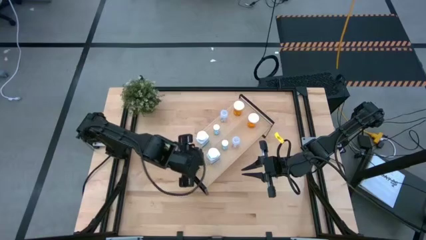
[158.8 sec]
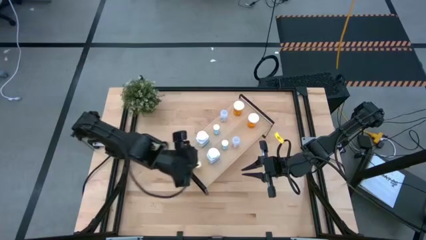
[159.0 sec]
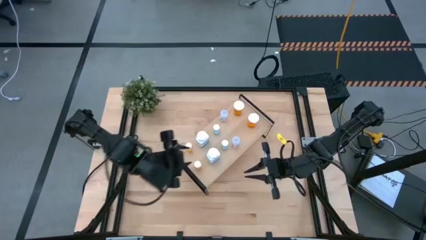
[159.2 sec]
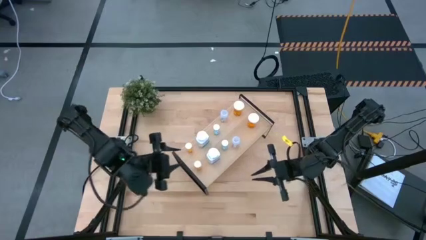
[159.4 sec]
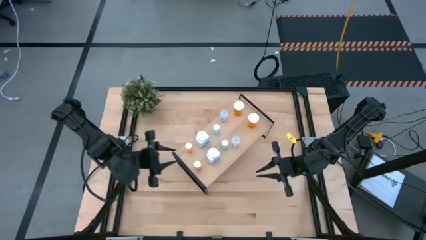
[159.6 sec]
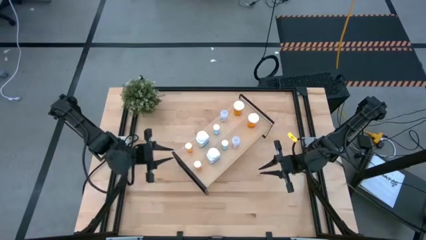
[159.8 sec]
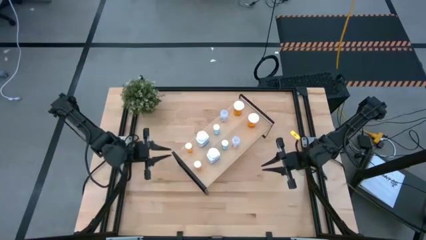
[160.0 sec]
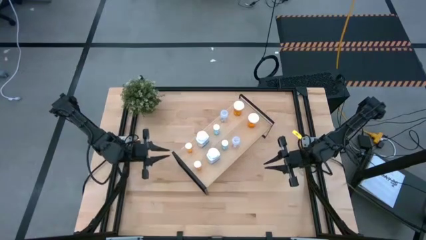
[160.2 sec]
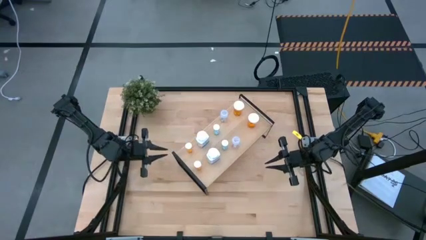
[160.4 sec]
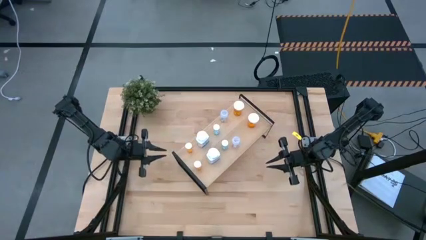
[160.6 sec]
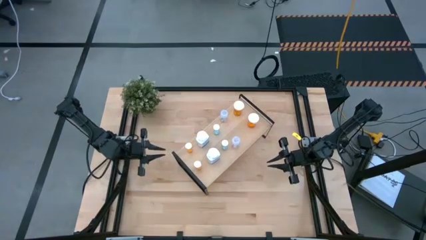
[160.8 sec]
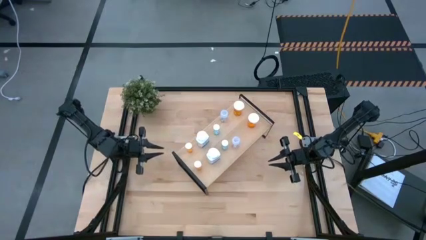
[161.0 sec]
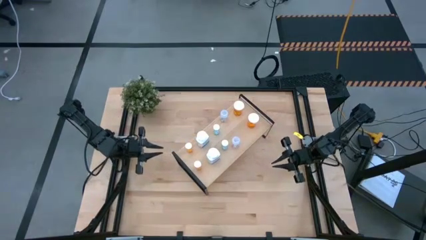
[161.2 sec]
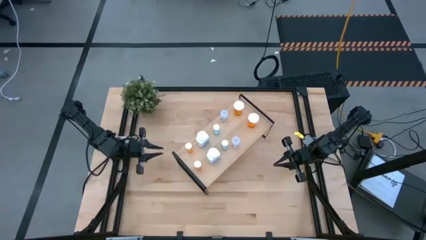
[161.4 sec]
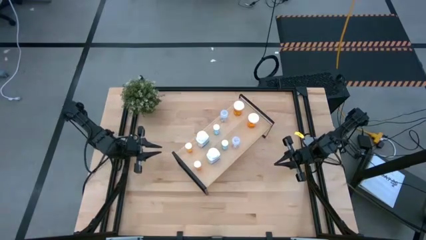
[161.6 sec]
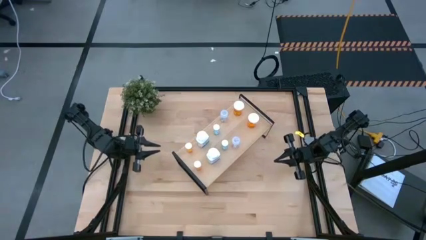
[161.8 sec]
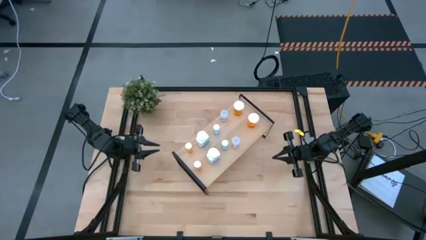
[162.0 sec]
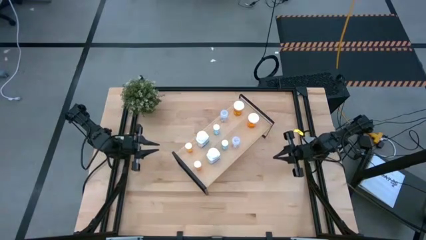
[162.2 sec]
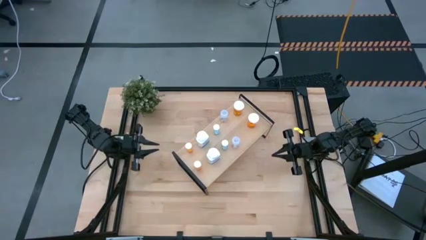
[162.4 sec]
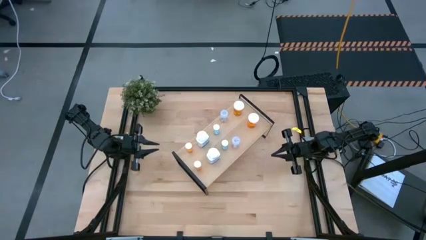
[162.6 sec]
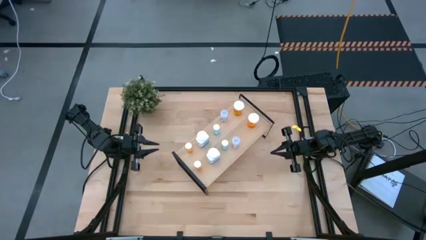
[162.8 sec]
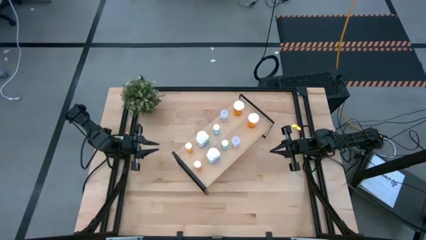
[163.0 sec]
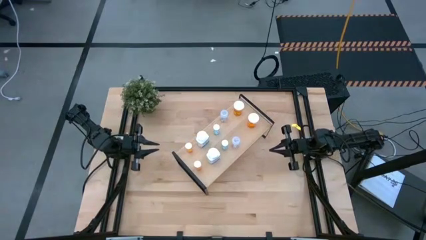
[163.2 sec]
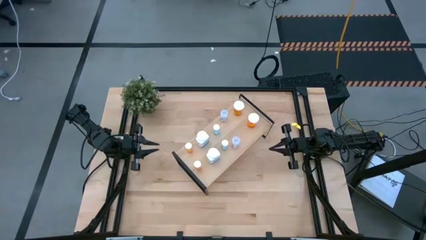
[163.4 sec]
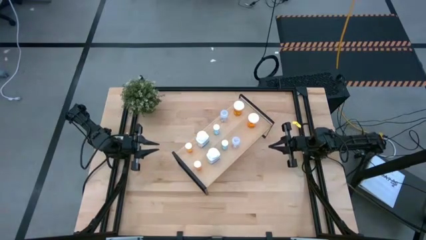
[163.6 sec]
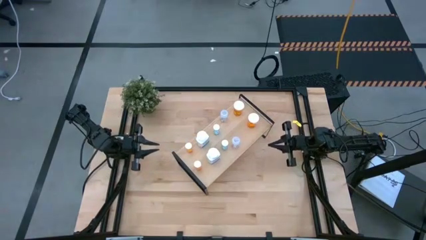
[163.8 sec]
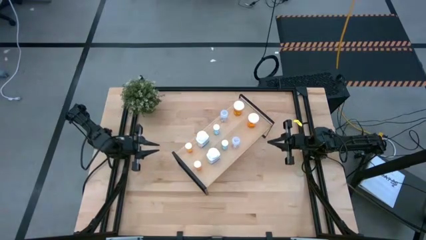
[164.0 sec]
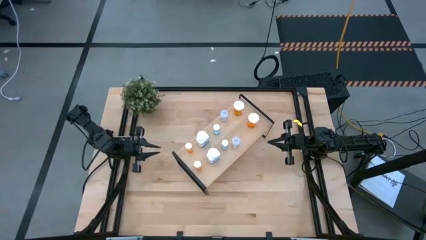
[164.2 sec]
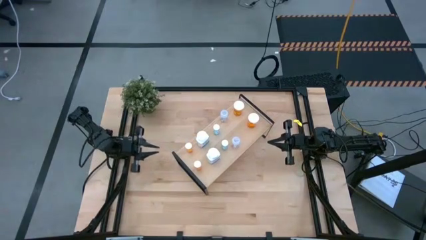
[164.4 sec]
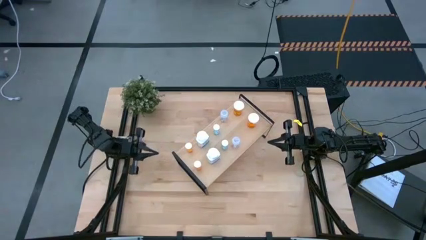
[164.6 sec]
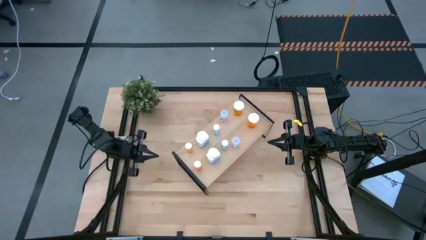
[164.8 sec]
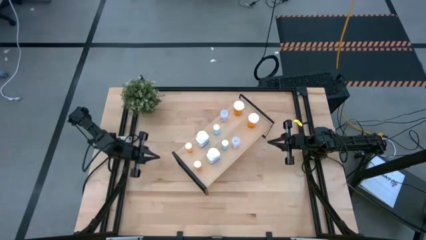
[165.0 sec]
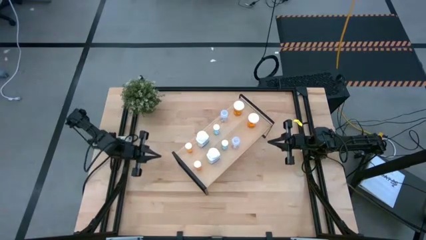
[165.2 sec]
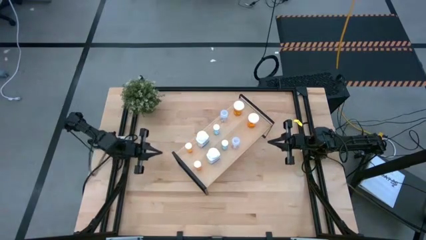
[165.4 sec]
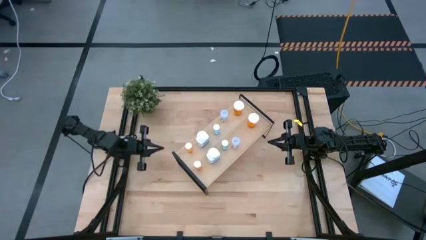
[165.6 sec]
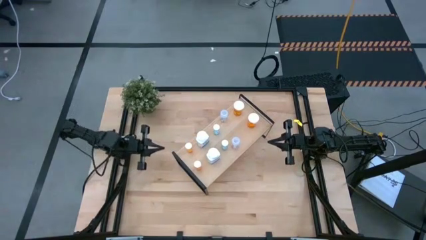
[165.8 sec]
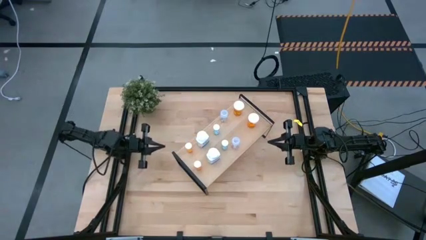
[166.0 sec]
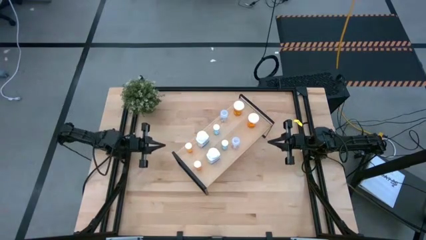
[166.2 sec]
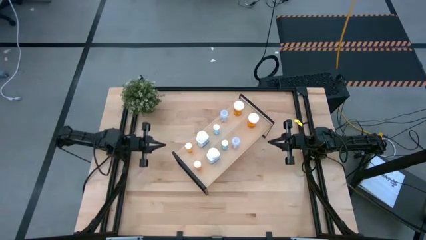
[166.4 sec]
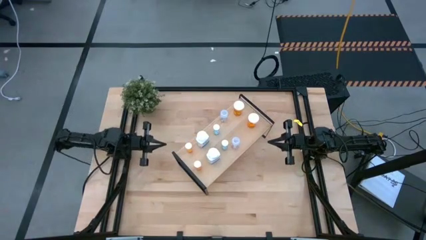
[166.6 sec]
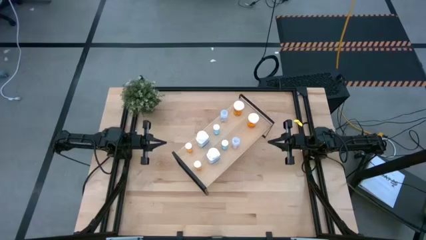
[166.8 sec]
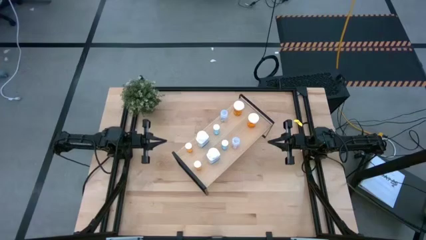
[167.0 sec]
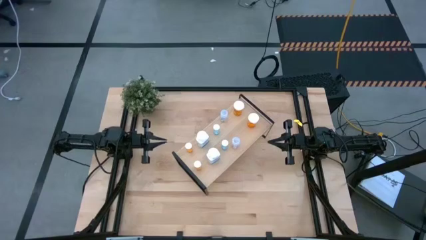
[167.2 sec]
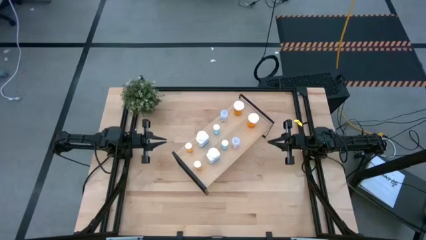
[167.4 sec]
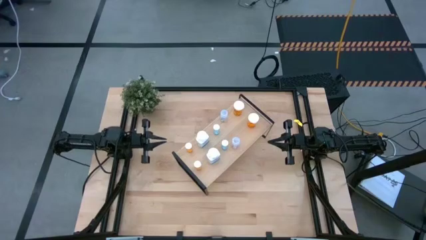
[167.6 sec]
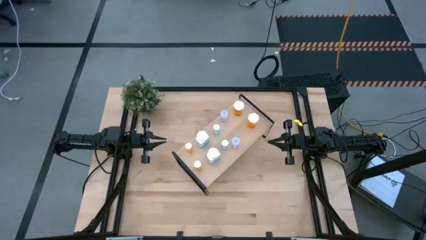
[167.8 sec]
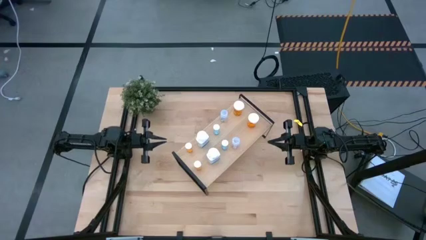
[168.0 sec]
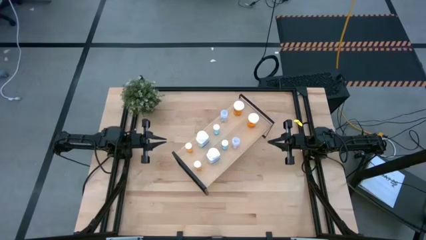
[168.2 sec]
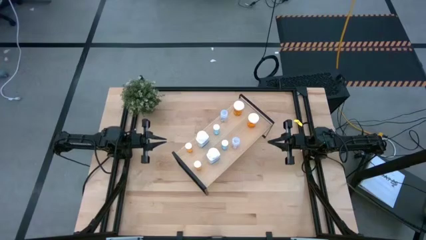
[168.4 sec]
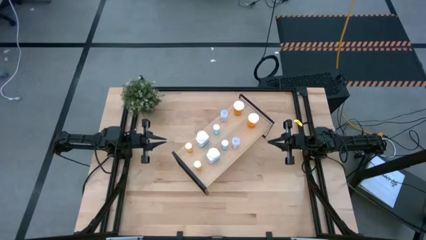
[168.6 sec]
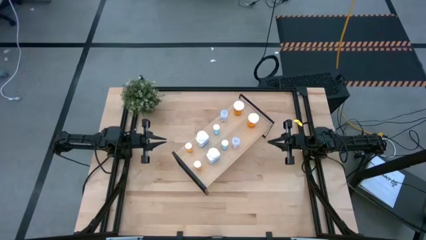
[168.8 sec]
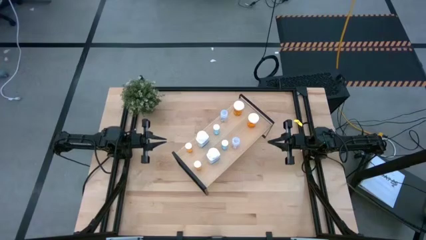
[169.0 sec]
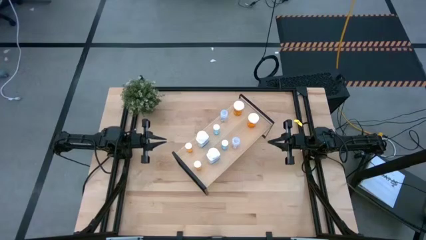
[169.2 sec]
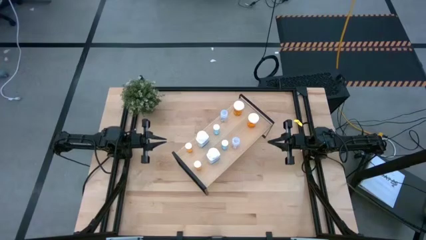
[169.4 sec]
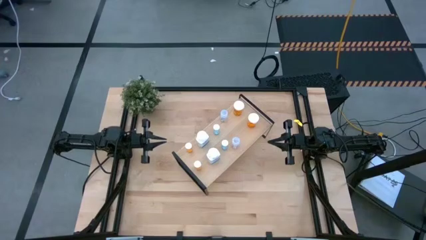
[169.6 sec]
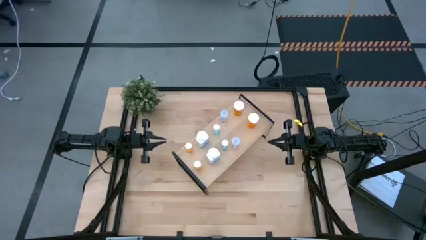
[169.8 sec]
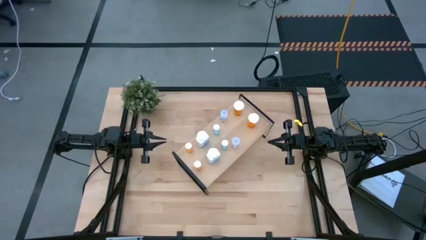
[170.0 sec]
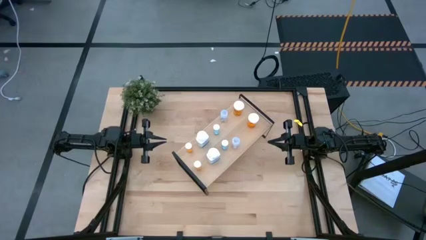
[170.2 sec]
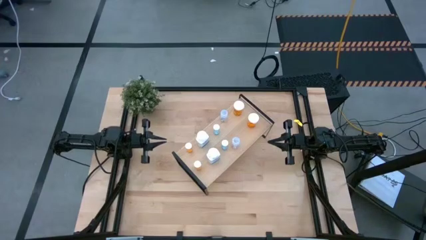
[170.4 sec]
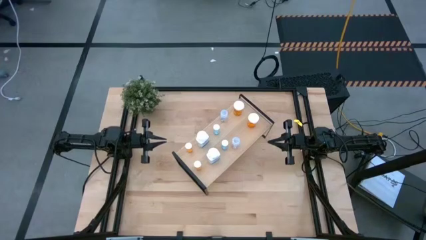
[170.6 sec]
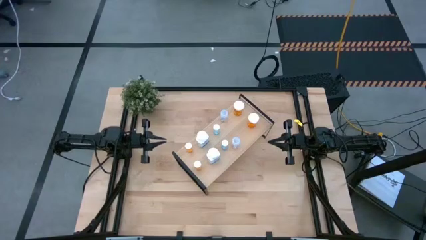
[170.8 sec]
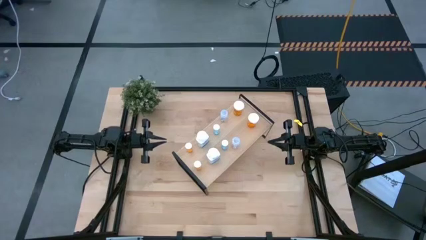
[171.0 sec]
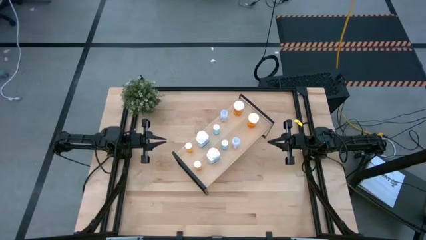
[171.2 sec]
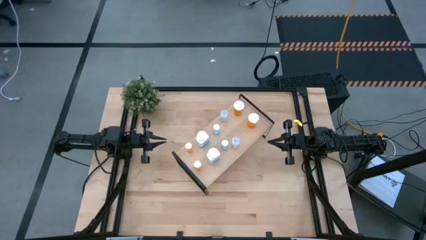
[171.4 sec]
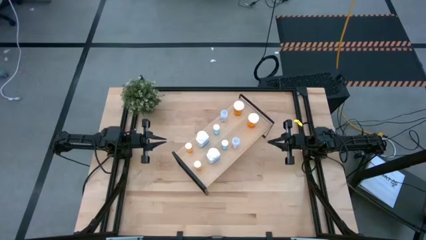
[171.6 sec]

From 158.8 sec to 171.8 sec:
Task: Pick and place medicine bottles onto shelf by color
Return to Home Position
